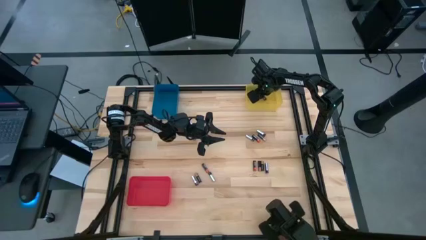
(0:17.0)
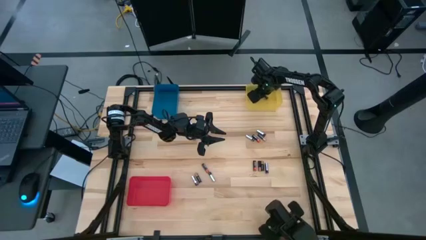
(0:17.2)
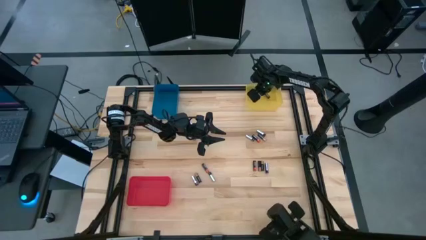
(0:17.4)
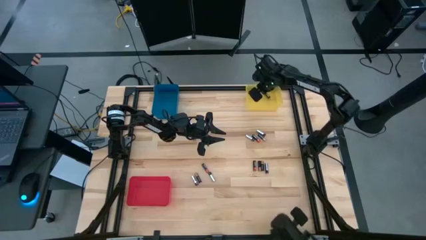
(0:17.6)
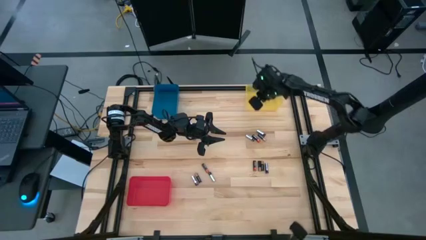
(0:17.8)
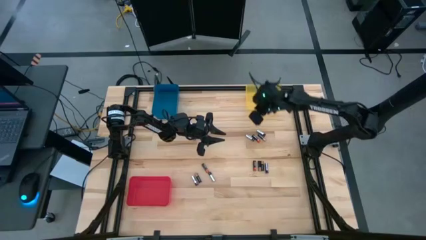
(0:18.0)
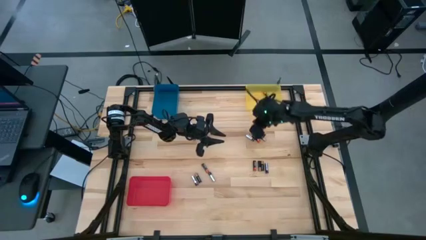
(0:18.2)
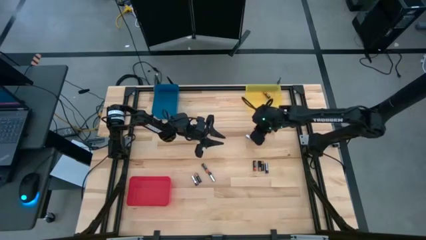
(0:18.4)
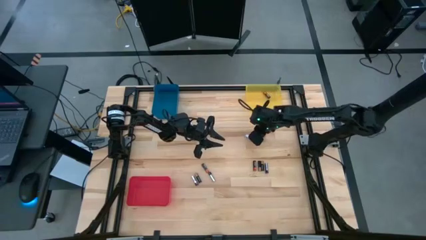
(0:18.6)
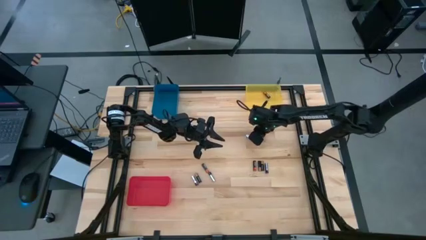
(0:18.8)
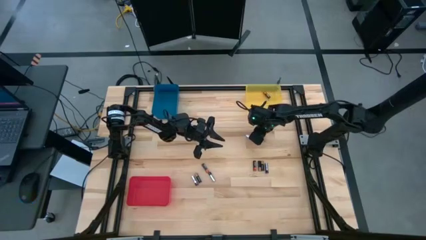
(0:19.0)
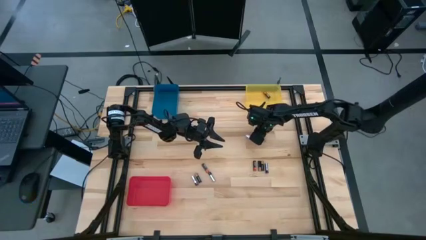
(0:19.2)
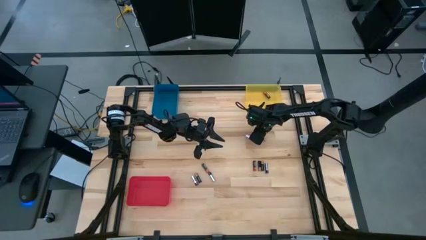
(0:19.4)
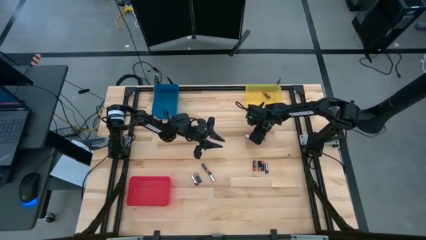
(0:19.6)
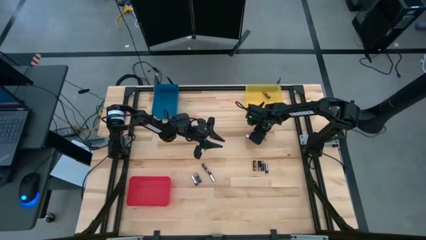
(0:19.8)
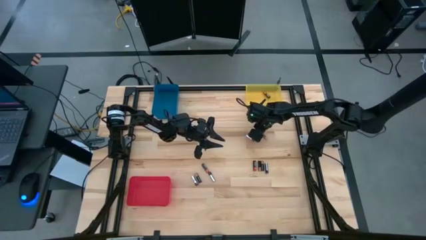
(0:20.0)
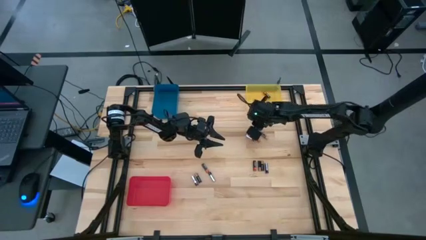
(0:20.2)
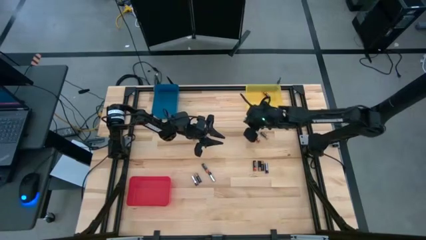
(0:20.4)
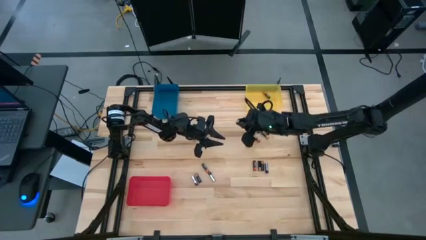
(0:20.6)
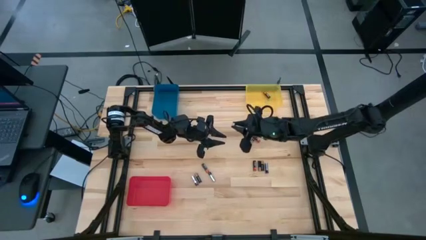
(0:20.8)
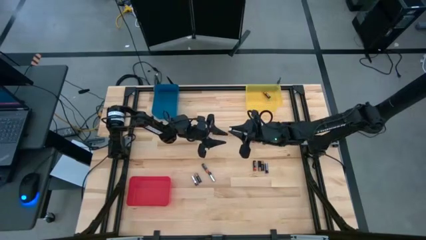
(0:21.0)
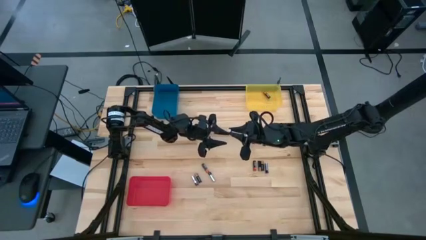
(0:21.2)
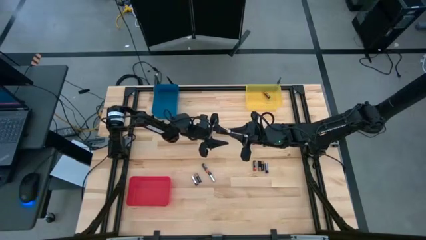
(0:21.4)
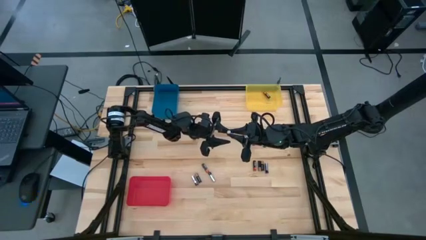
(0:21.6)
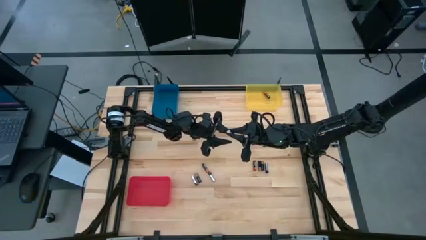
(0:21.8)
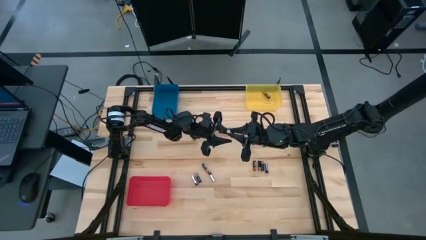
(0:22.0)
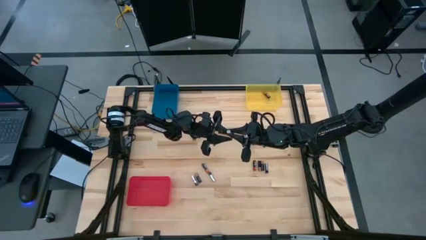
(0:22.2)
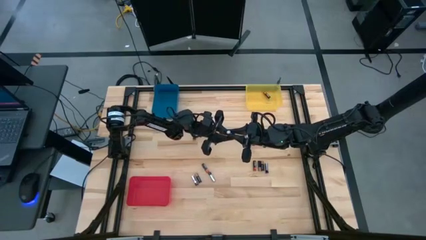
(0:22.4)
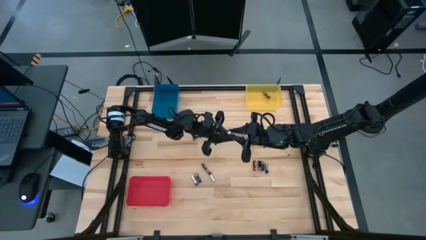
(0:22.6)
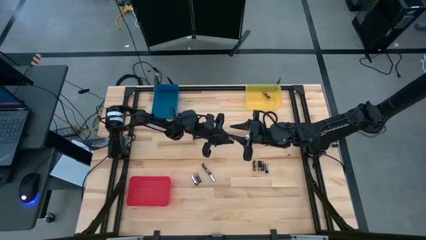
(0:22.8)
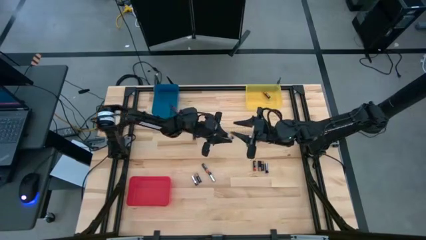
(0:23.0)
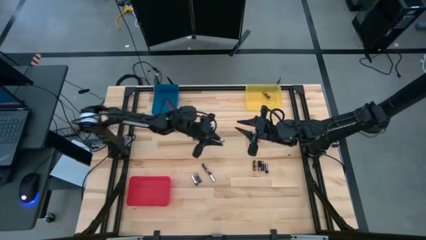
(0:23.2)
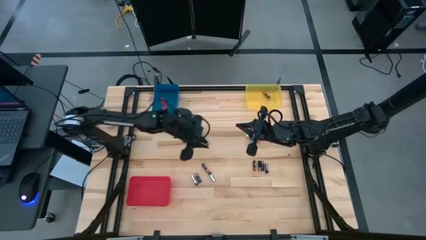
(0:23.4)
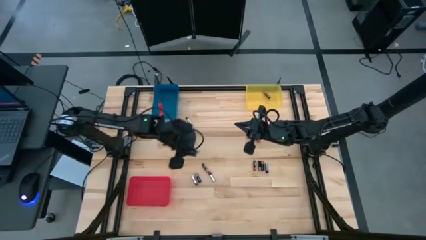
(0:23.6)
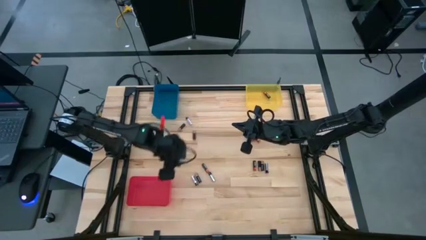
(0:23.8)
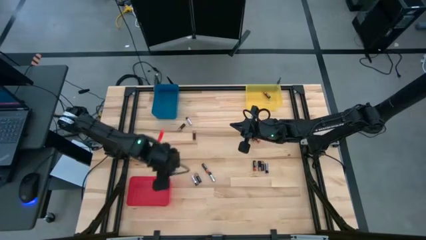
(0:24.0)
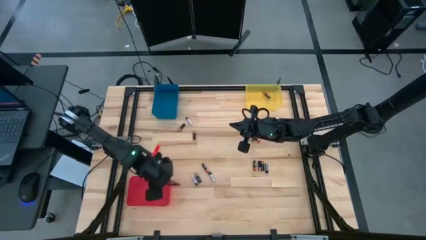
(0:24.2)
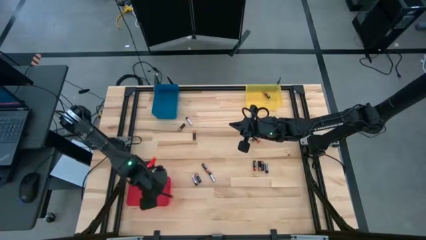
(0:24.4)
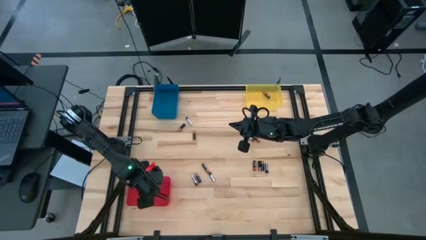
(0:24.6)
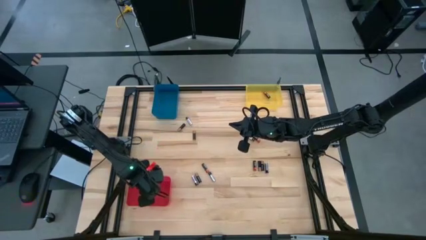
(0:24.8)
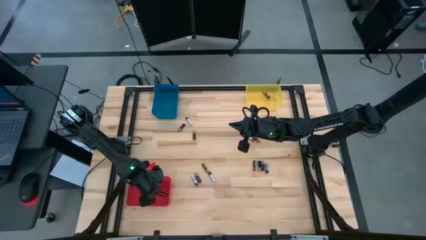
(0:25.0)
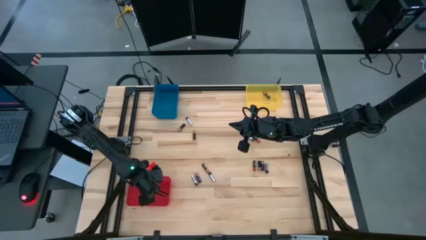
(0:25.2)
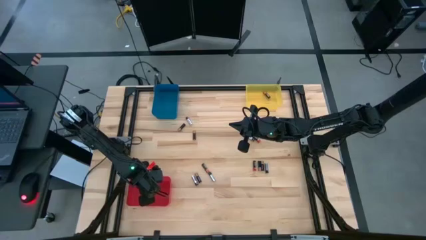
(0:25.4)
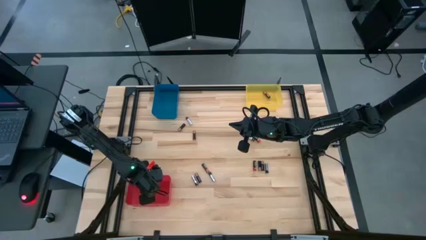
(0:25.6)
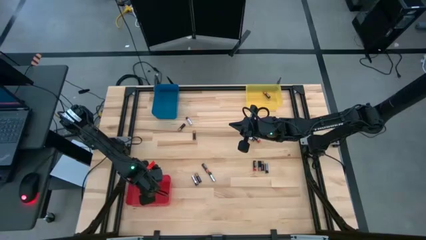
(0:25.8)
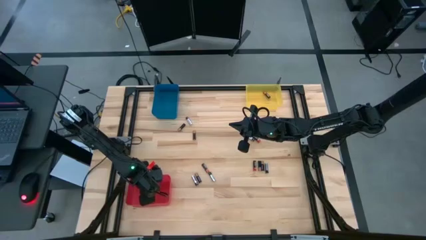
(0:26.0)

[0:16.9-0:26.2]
Task: Sort batteries
Put the silver battery into the red bin

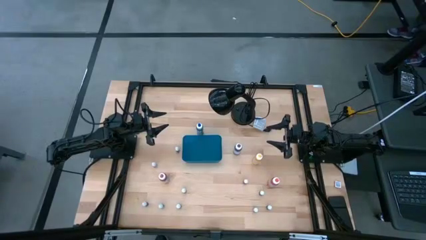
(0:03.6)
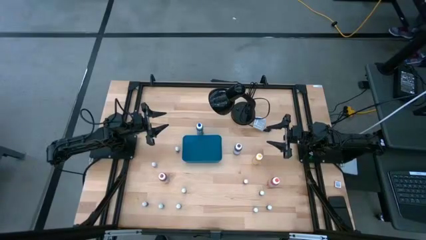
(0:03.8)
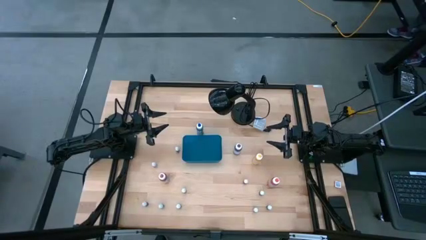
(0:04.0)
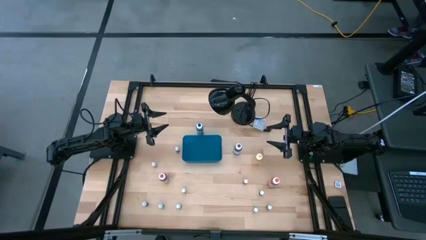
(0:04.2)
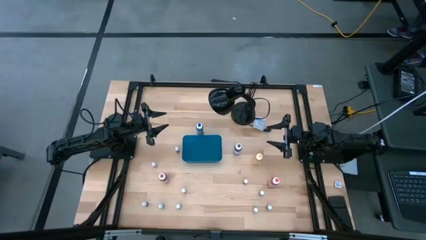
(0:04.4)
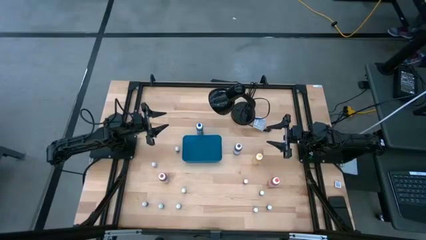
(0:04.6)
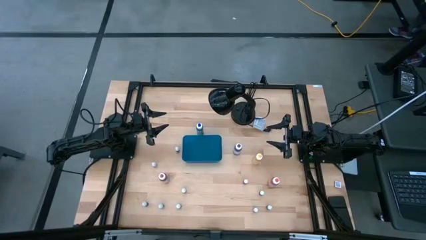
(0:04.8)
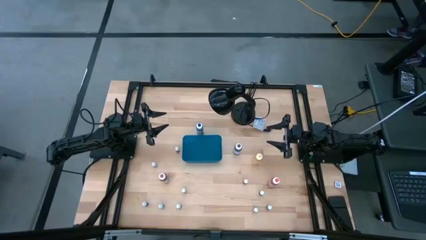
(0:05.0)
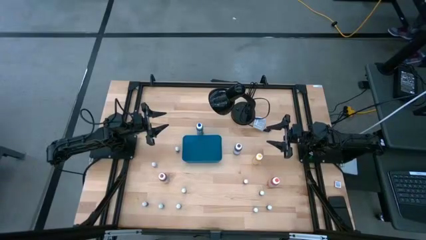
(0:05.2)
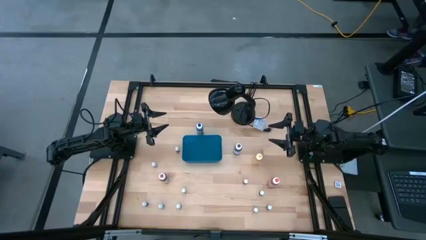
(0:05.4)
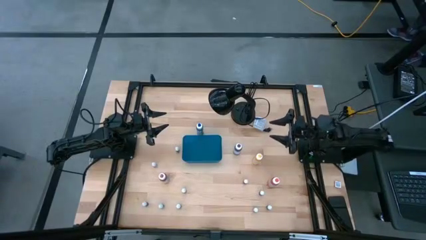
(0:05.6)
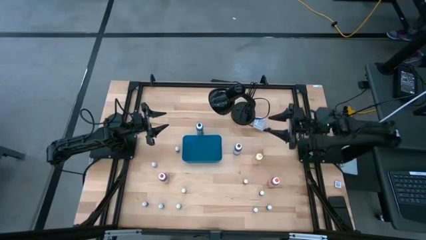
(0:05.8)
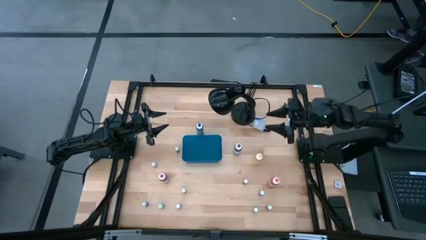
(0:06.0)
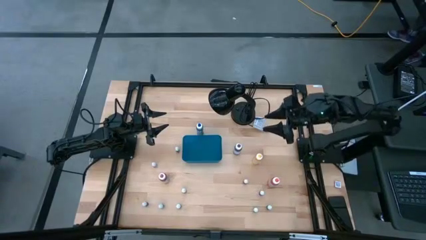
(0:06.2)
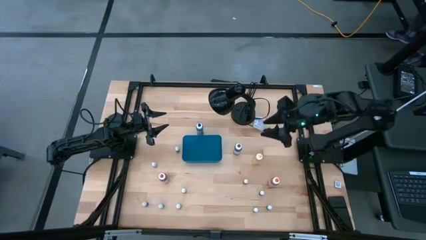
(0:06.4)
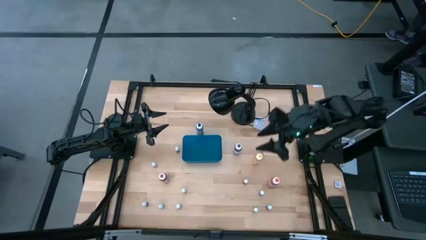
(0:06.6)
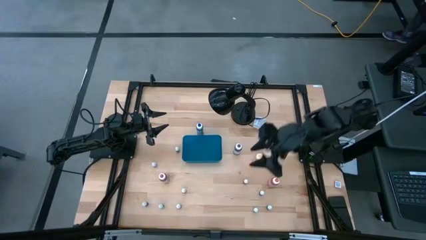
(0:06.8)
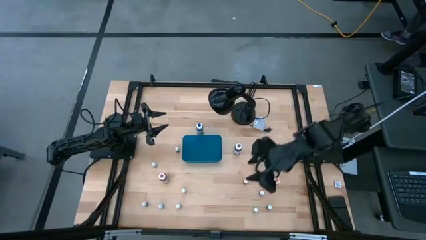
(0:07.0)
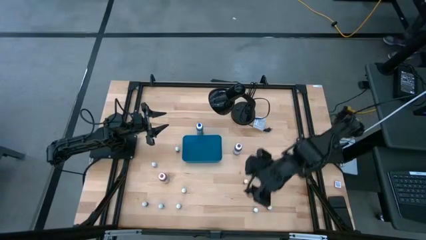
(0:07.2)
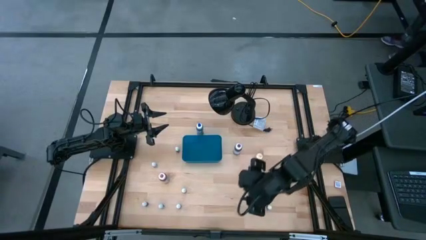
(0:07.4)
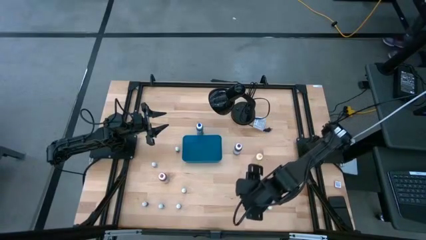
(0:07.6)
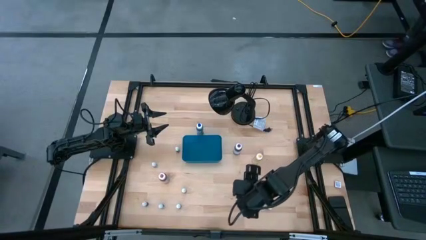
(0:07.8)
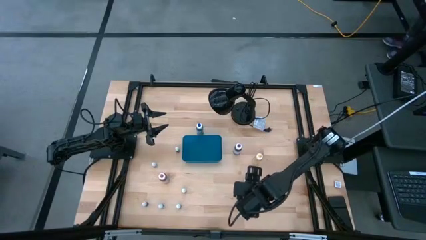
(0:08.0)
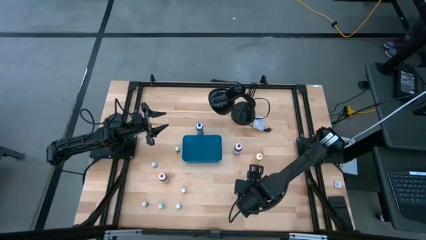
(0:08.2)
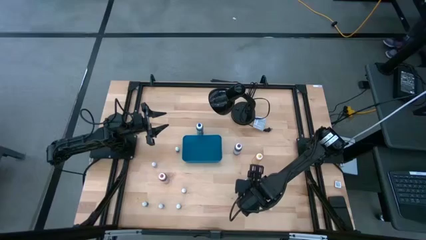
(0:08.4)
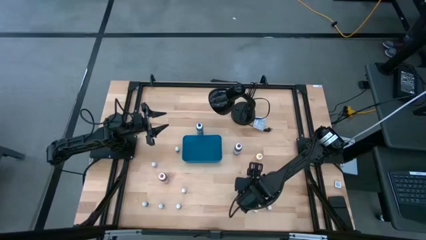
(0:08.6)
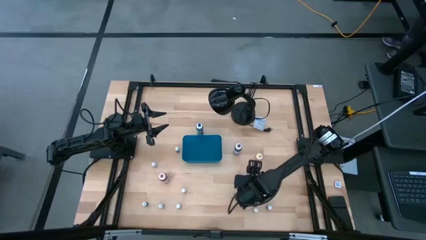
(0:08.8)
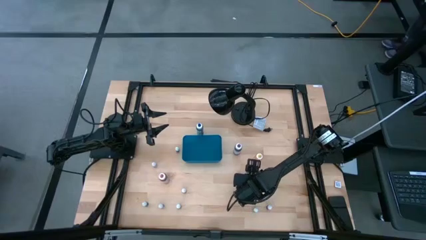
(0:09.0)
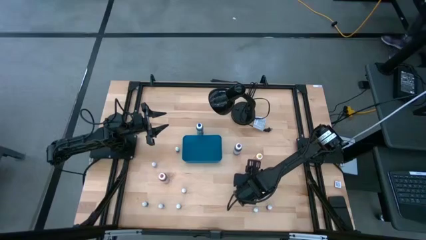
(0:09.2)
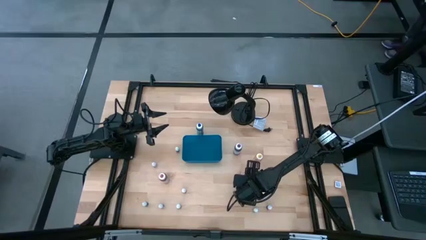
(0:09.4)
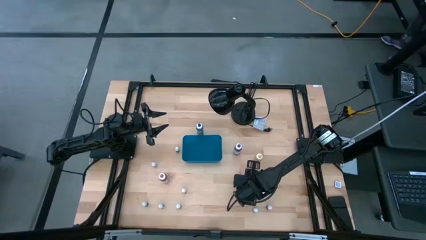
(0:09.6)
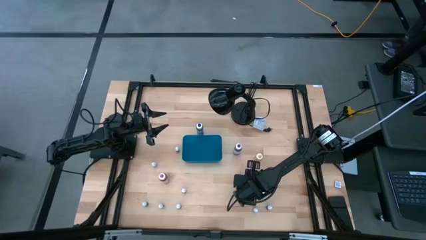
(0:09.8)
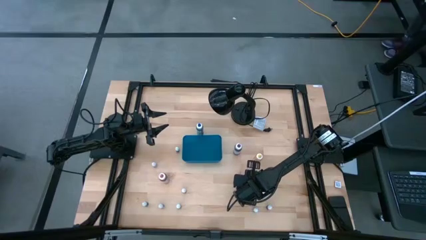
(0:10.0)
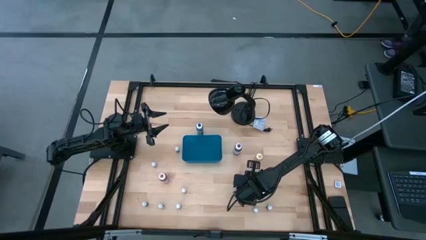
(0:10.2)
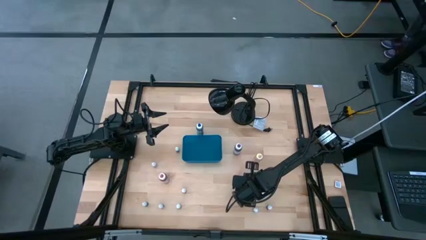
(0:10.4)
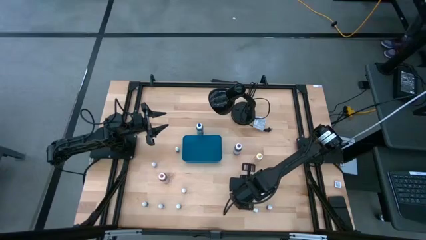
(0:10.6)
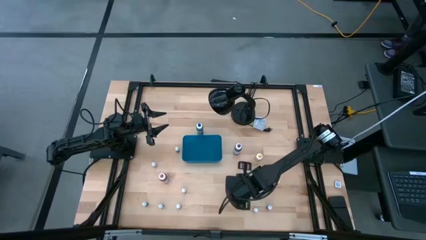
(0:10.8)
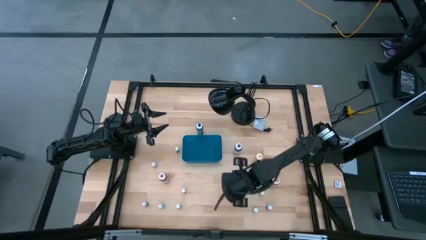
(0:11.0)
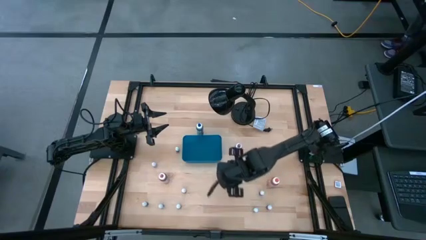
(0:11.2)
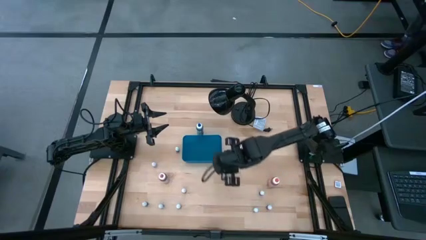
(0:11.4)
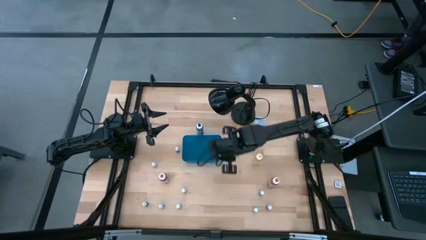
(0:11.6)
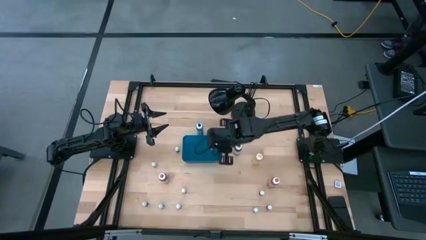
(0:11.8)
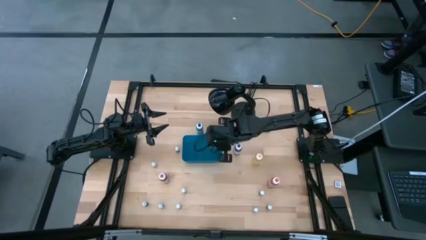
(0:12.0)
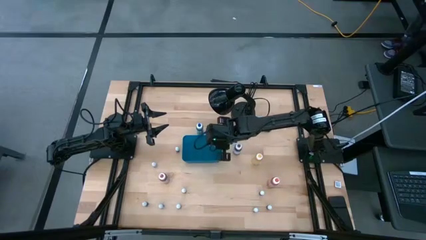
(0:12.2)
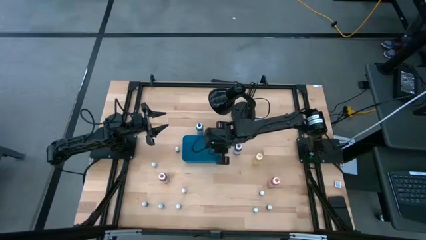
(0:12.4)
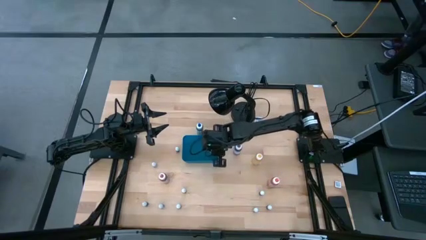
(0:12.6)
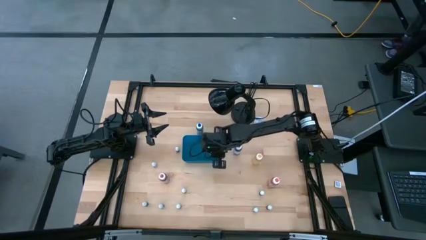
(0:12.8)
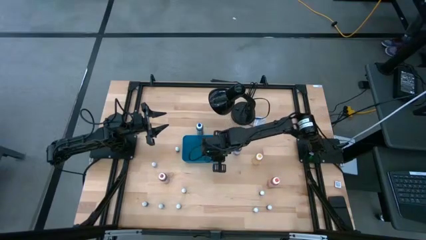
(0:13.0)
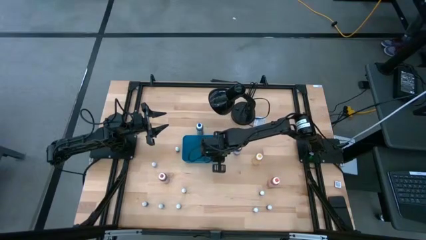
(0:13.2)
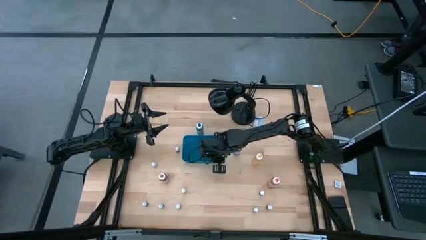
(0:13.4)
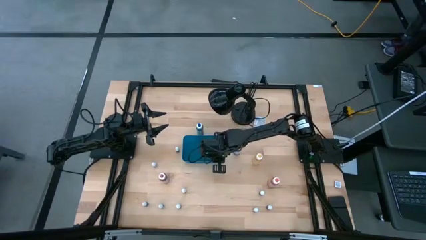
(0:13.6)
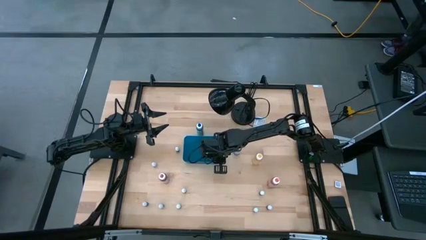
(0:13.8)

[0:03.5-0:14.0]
Task: Pick & Place food coloring
Put the small black food coloring bottle into the blue bin
